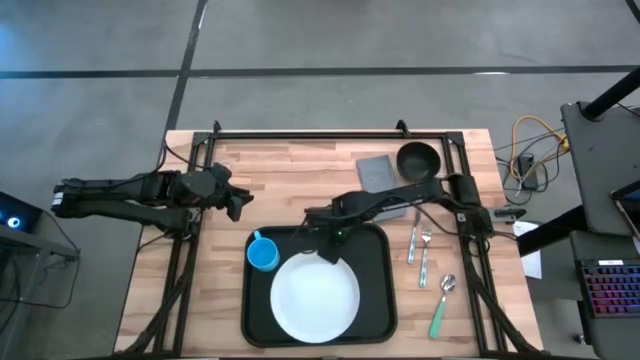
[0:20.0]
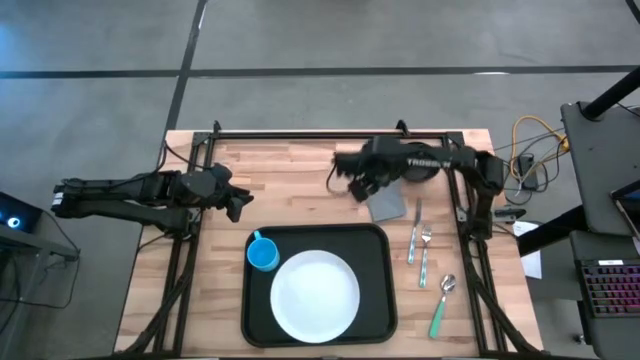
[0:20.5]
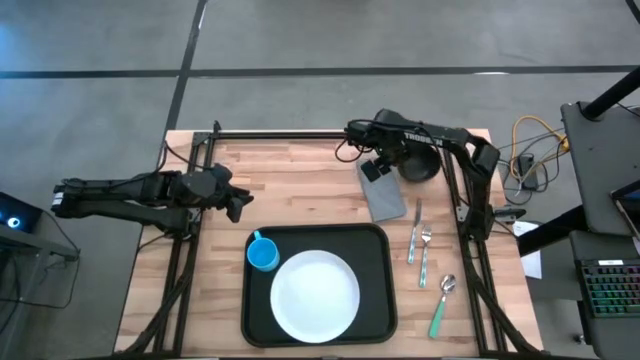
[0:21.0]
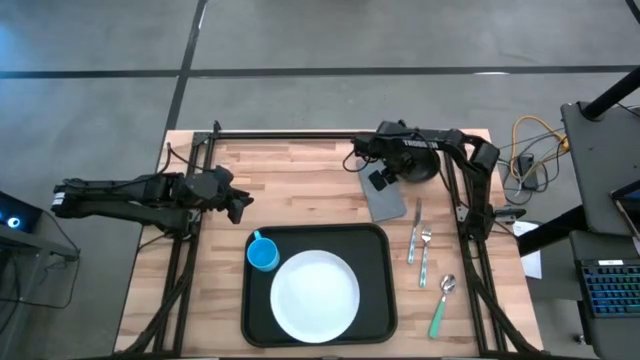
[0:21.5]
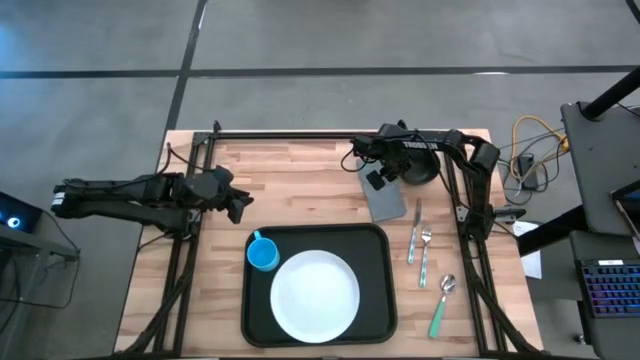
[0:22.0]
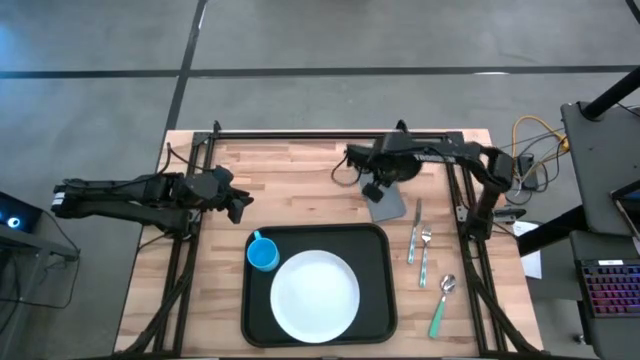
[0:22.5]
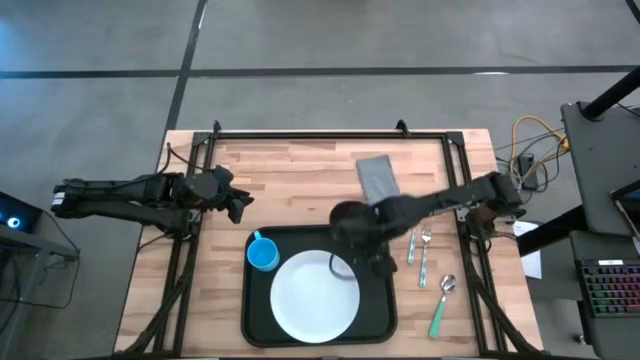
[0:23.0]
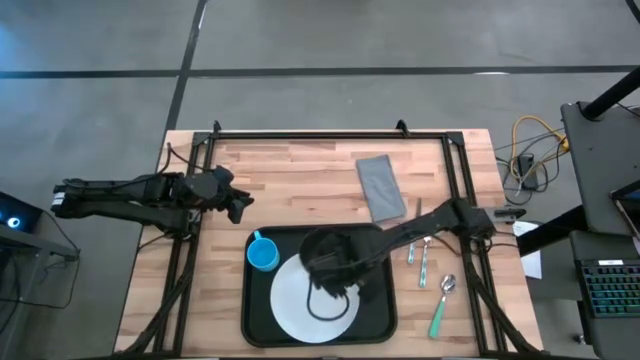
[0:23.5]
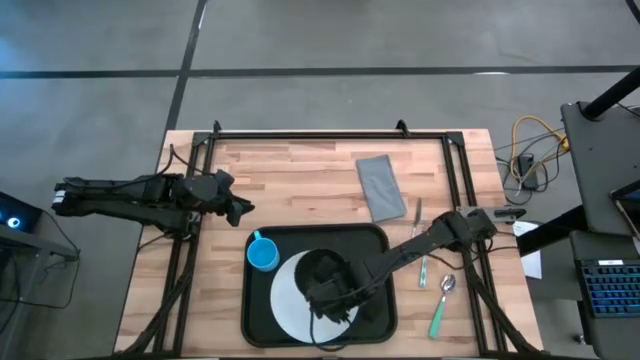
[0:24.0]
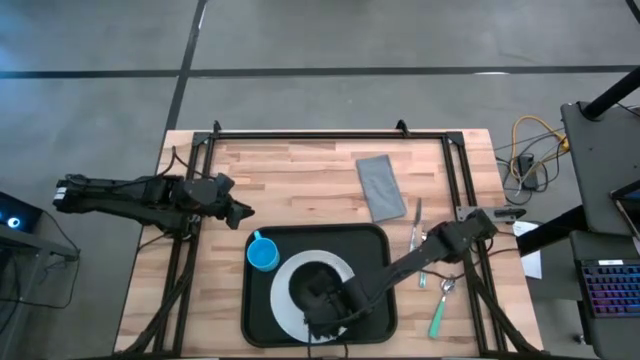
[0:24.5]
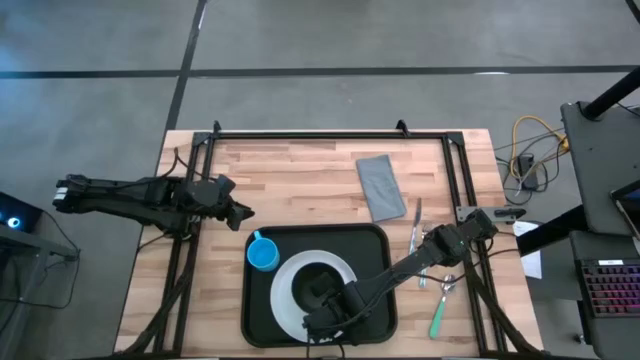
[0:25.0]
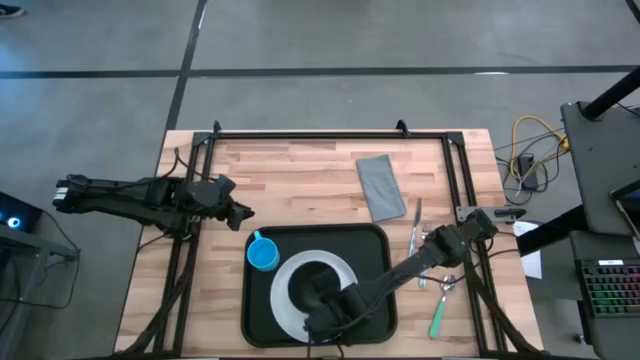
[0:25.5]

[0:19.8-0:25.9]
Task: Set up tray
Put the black bowl on the white plate

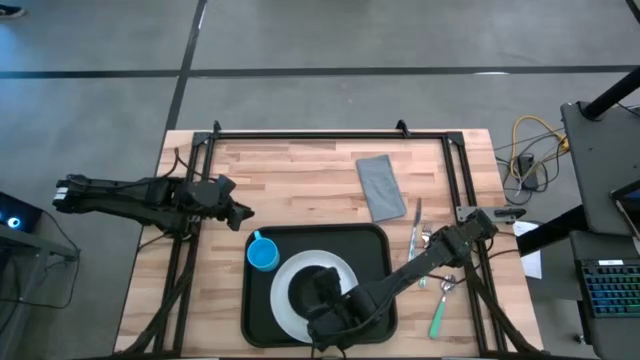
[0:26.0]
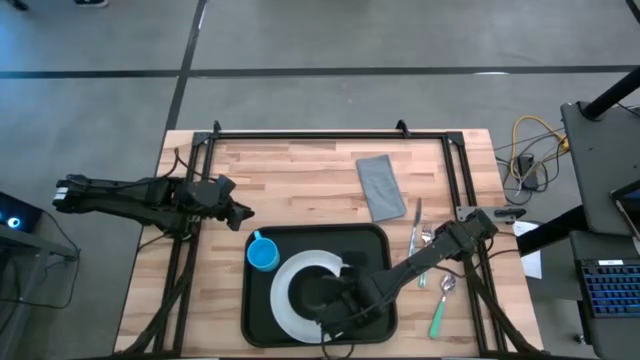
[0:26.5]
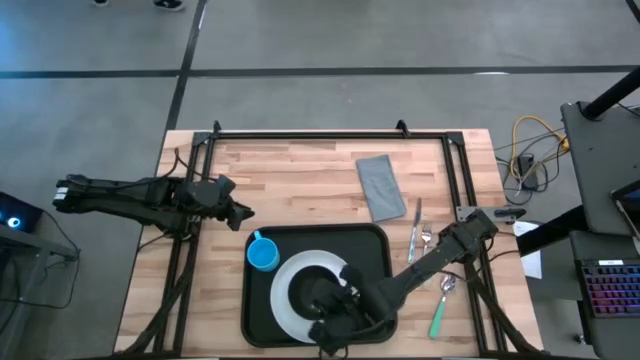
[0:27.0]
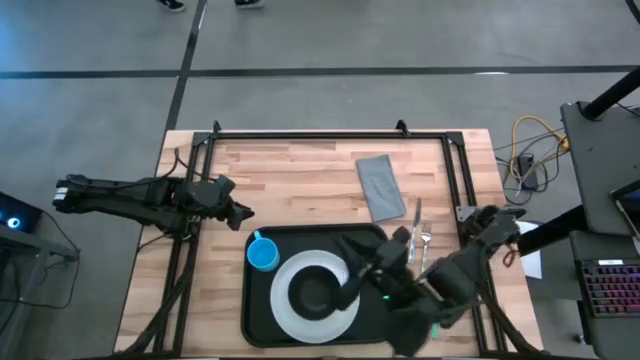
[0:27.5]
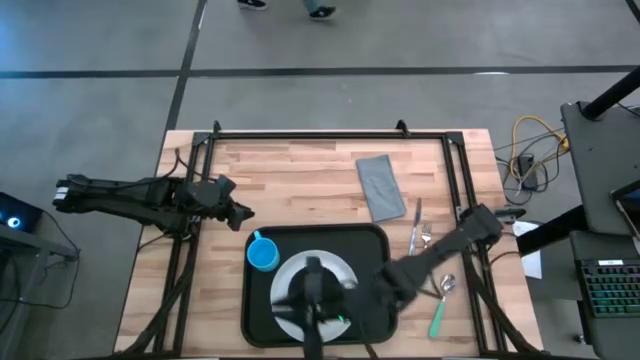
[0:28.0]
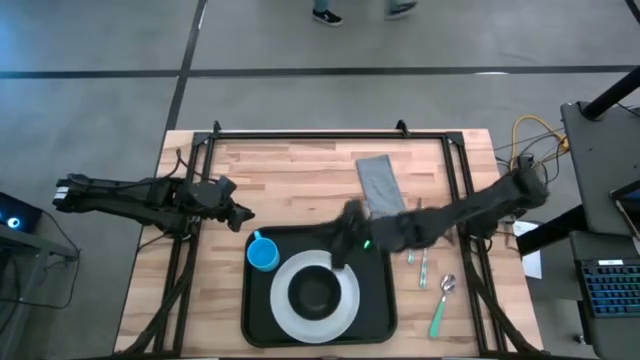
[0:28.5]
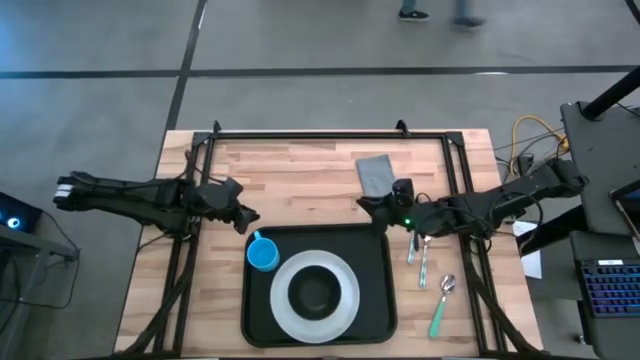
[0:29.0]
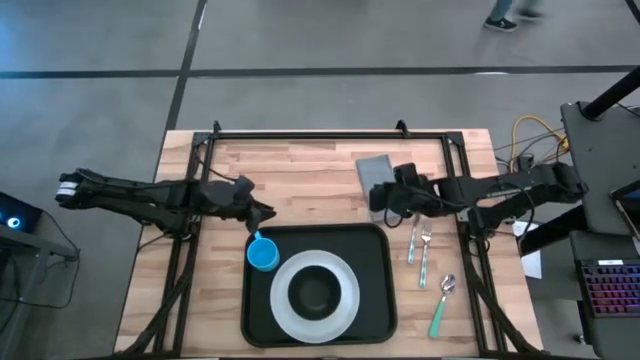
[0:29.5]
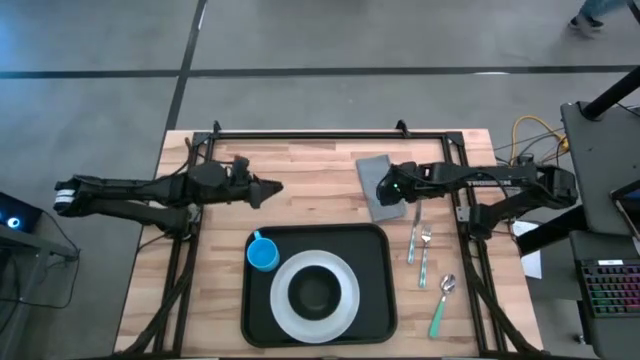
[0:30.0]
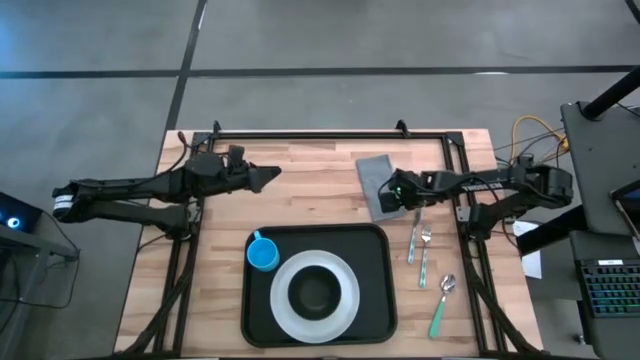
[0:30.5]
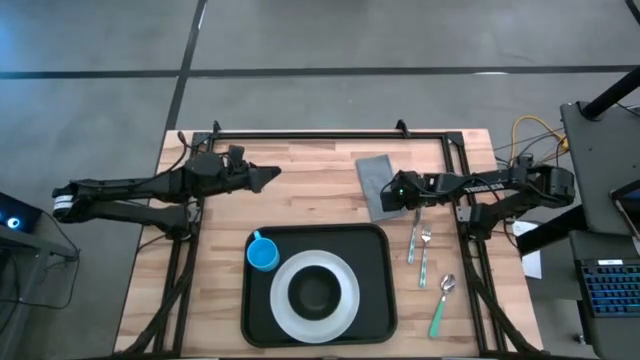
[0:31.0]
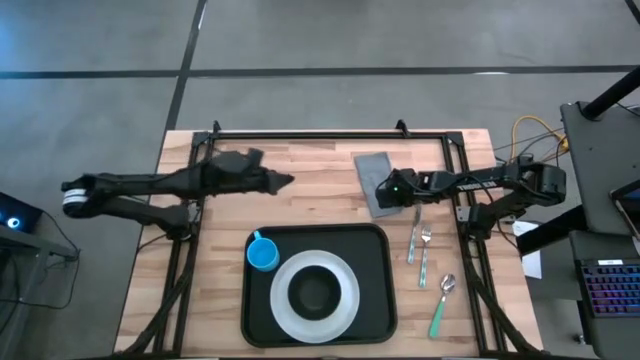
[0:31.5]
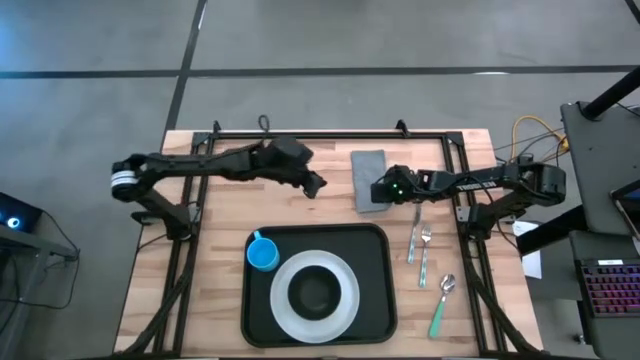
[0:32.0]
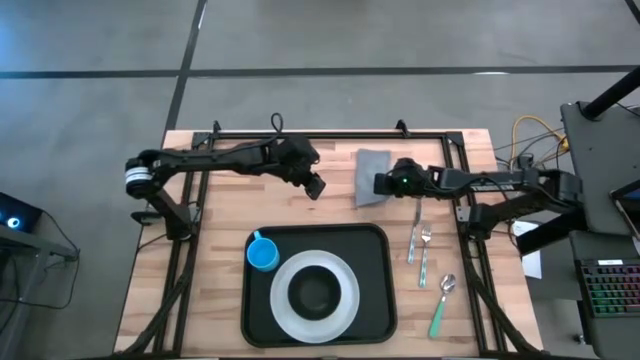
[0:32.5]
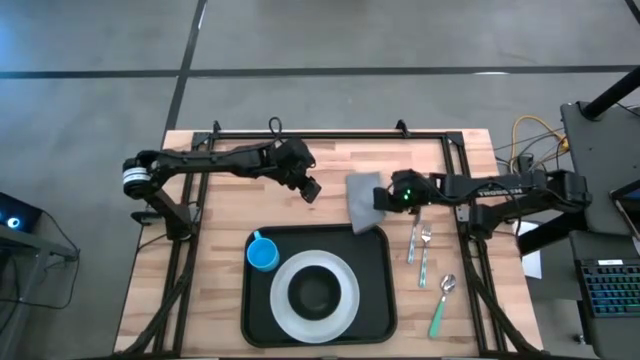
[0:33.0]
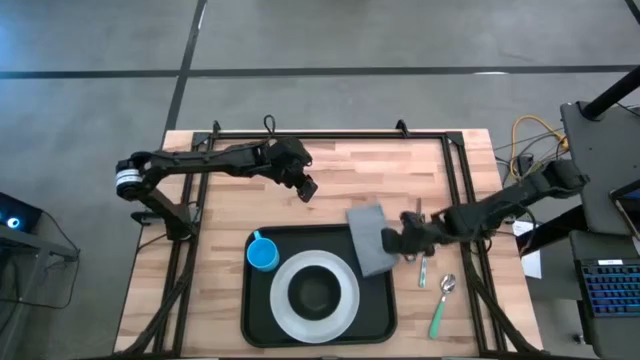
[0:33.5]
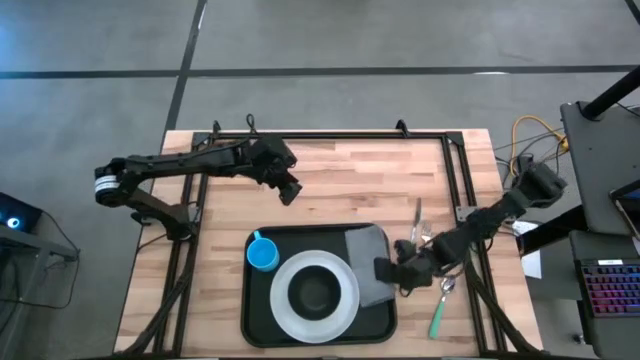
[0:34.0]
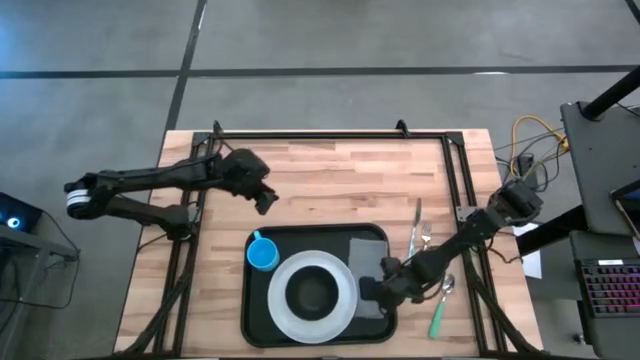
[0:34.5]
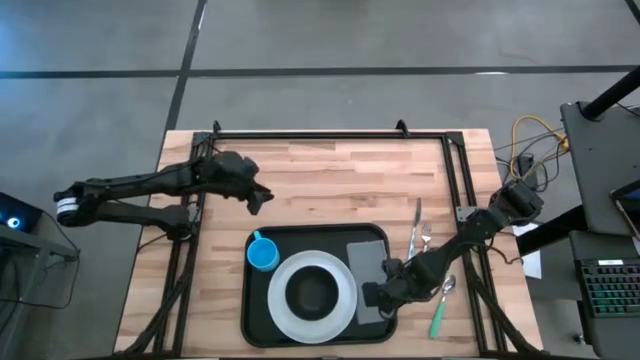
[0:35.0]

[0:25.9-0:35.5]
Put the gray napkin on the black tray to the right side of the white plate

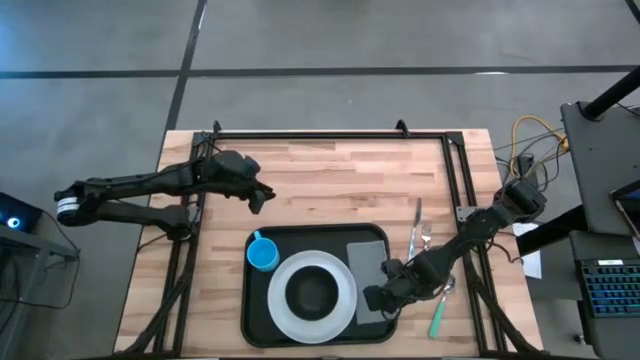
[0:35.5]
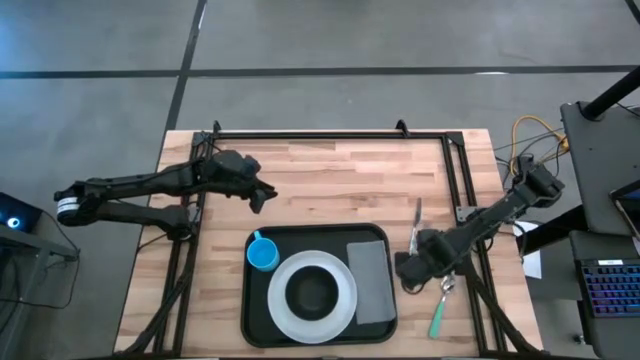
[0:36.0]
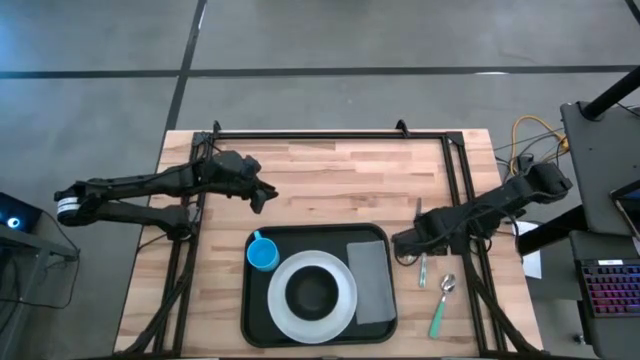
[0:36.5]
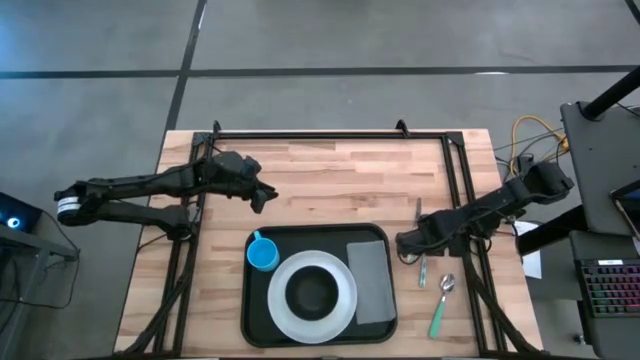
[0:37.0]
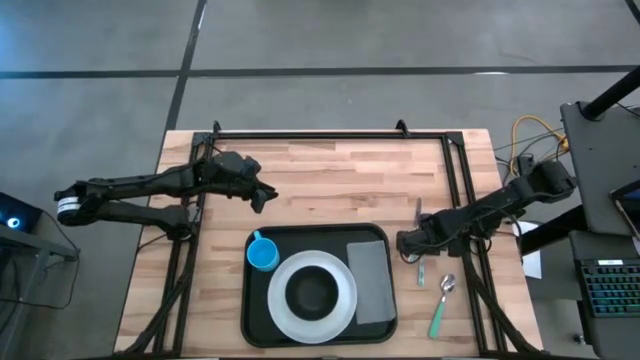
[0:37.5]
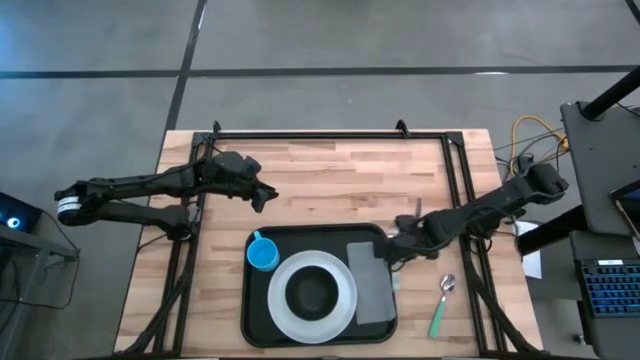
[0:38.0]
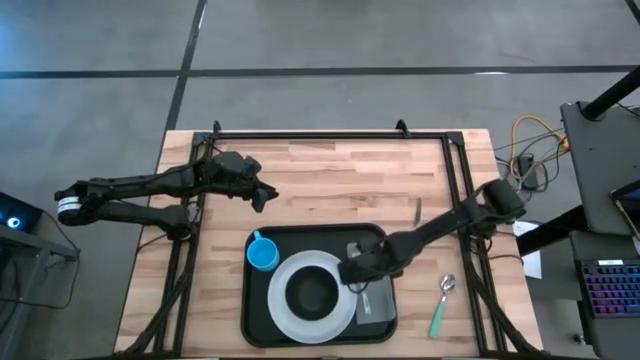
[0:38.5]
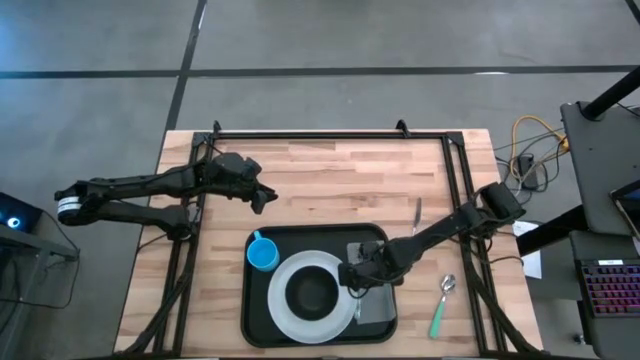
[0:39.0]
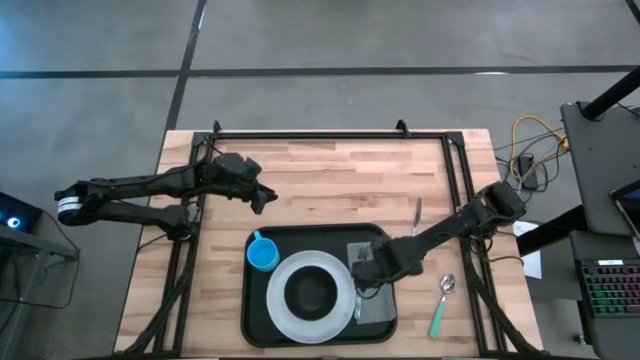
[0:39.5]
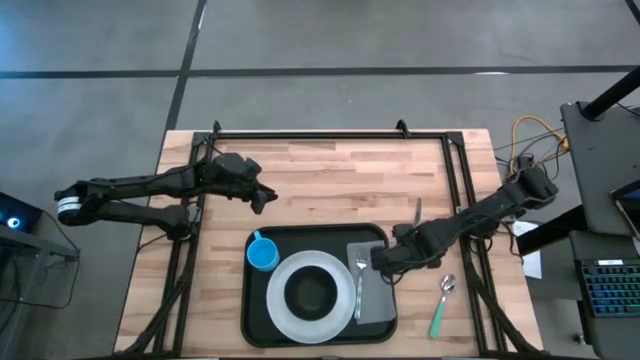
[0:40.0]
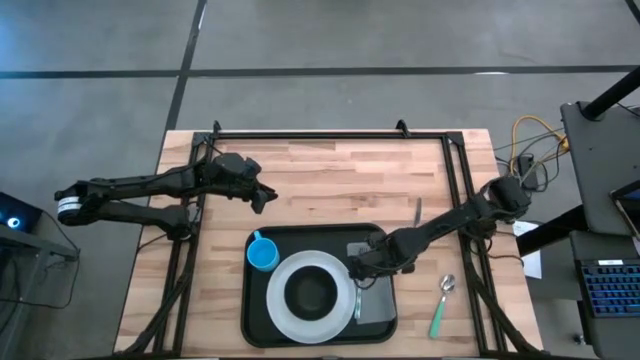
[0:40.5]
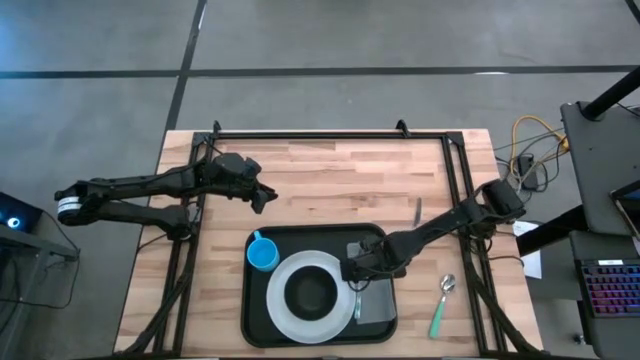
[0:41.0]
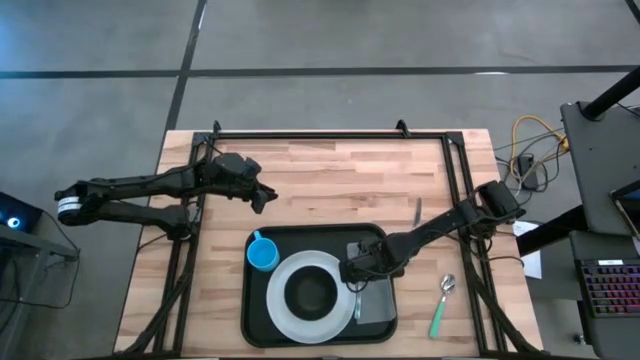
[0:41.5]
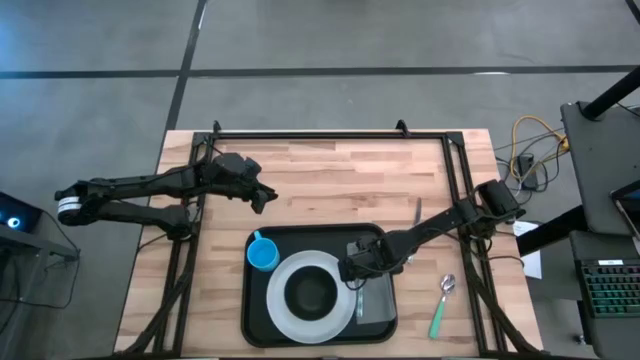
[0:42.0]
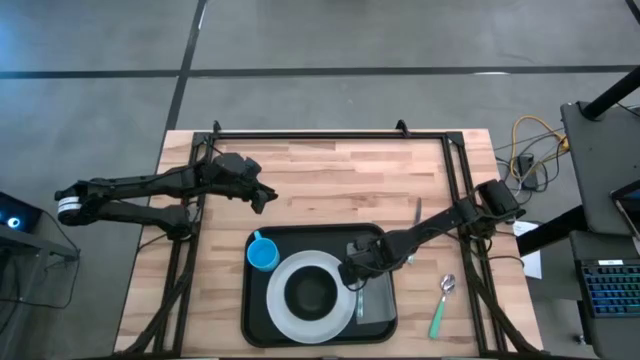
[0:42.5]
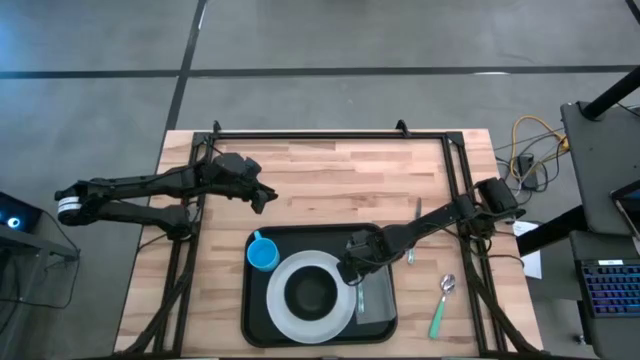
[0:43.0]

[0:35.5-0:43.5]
Put the white fork on the gray napkin to the right side of the white plate
